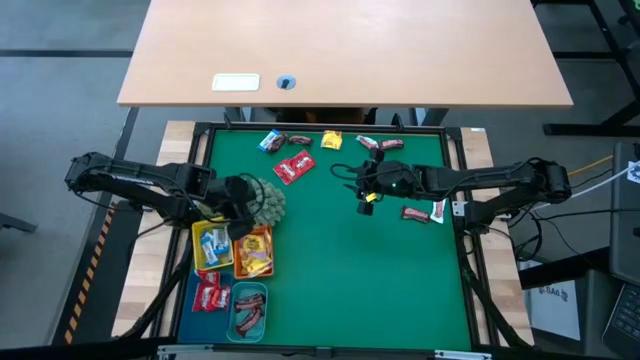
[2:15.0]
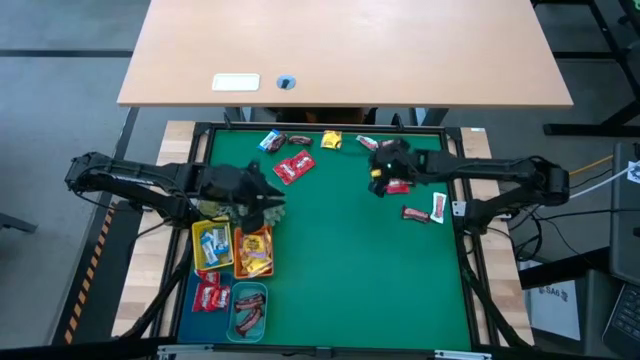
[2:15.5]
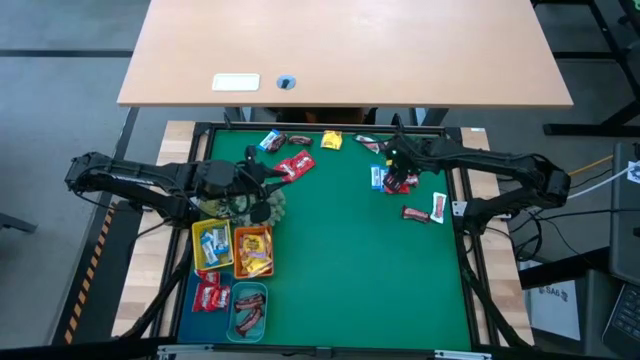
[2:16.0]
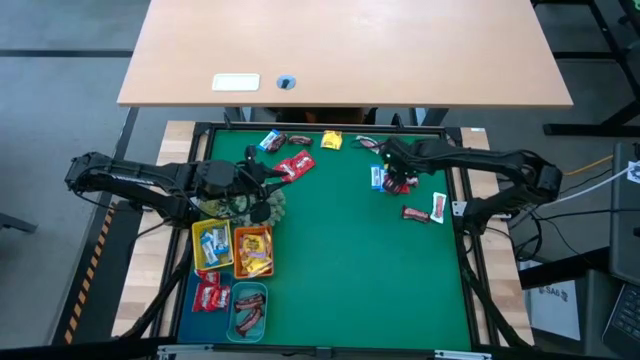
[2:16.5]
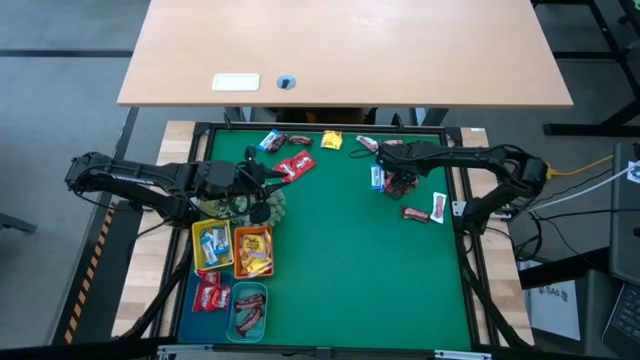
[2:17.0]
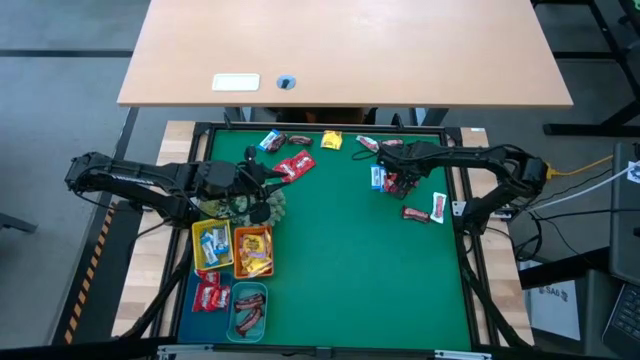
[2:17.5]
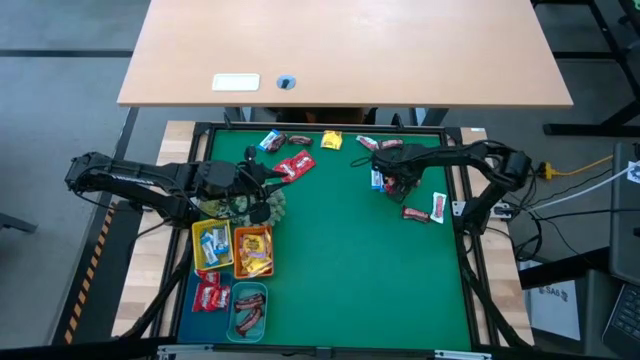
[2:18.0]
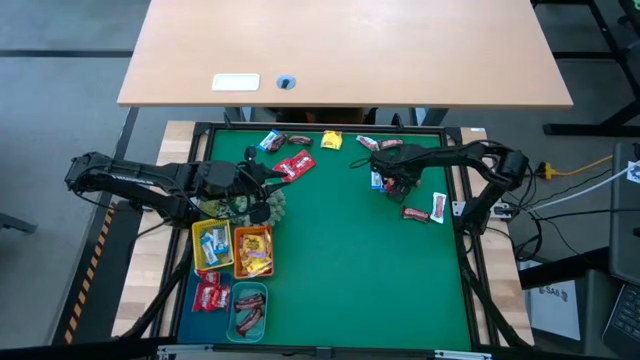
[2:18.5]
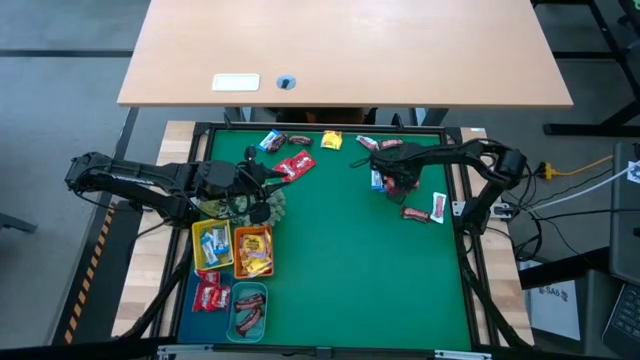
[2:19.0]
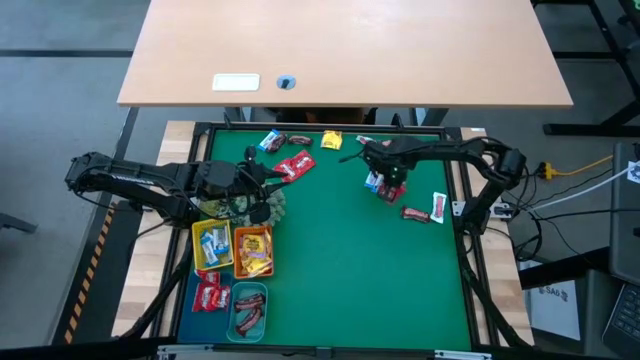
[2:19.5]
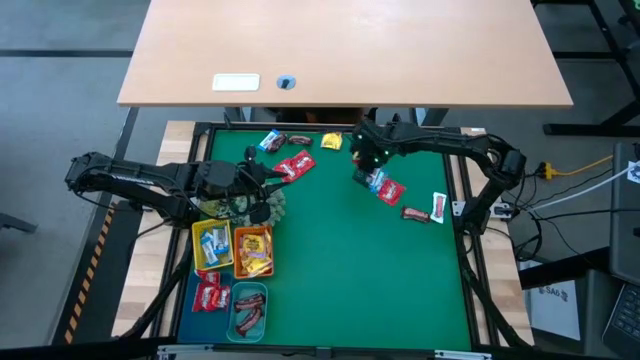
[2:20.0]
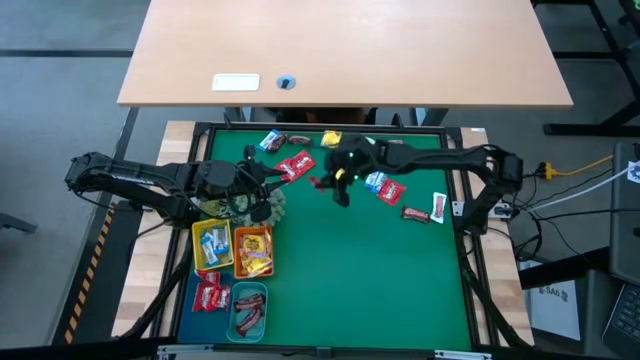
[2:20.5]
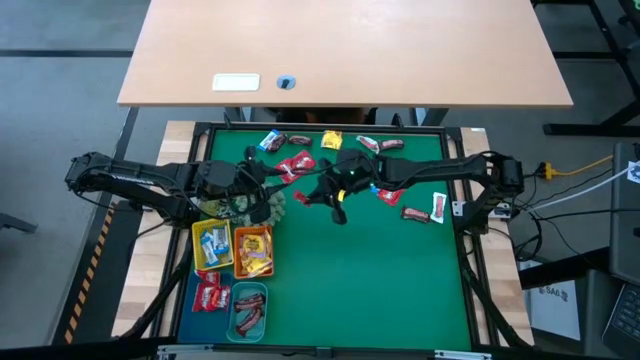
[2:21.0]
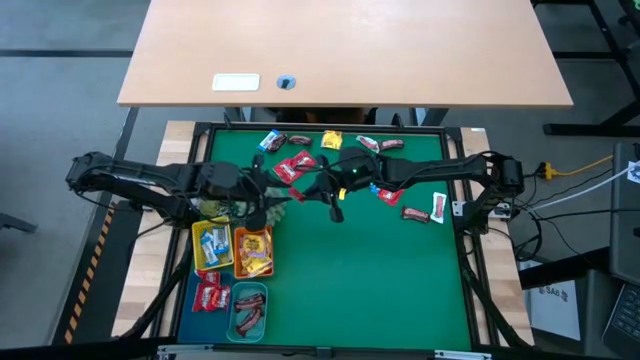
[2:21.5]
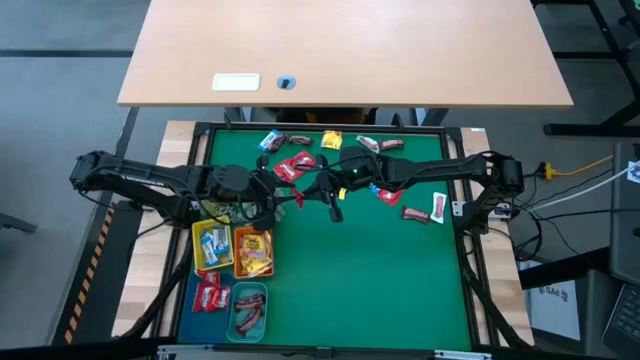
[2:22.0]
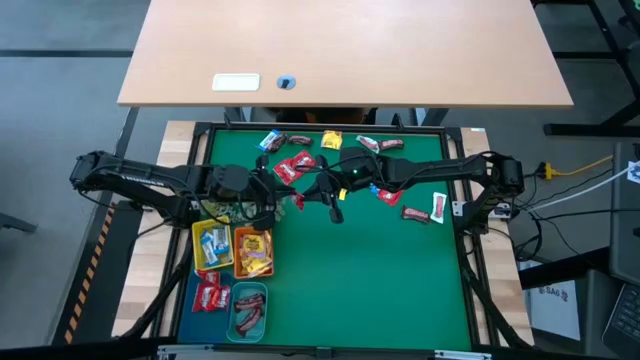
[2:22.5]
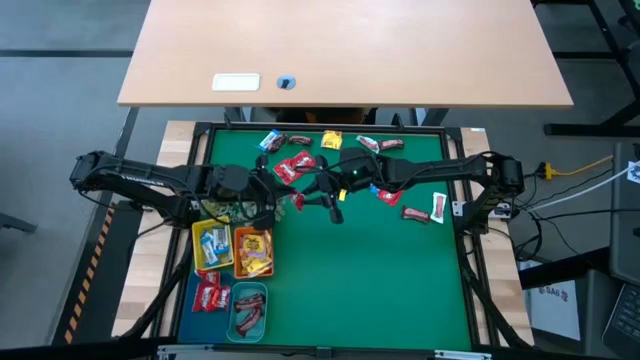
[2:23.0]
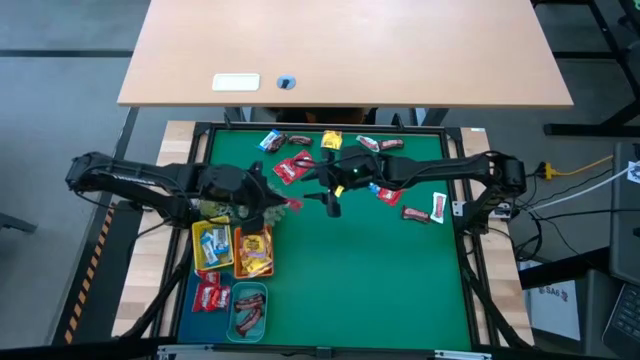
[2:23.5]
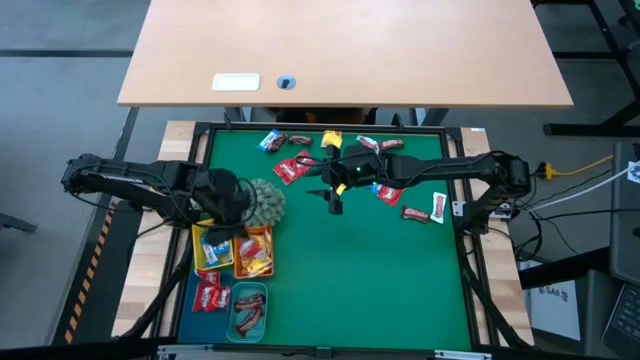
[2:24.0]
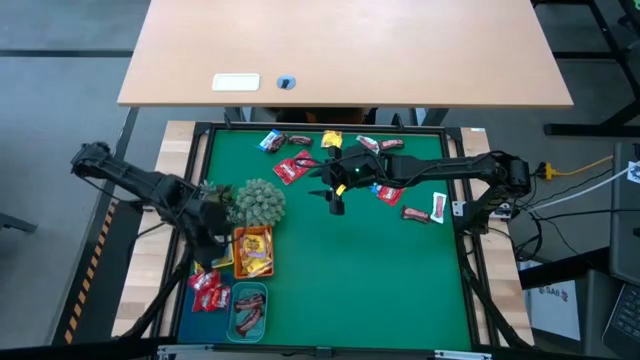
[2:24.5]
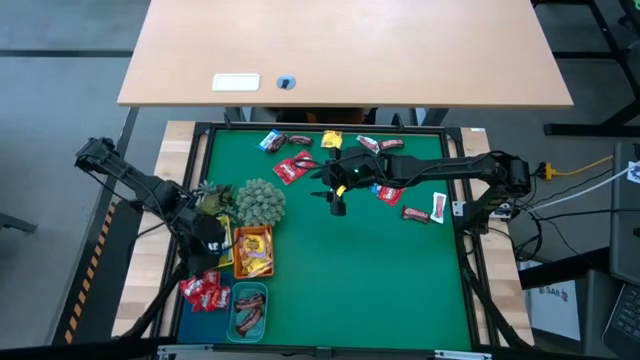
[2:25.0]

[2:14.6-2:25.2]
Task: Sort candy
Put the red candy into the blue basket

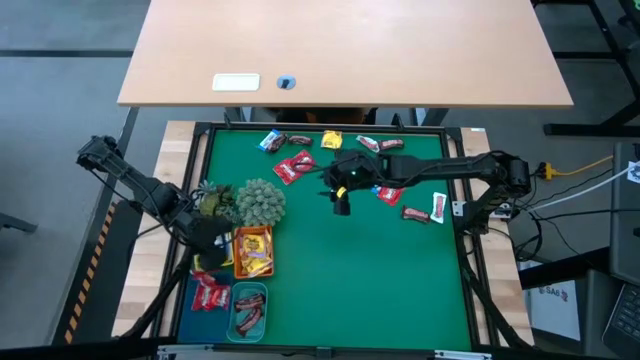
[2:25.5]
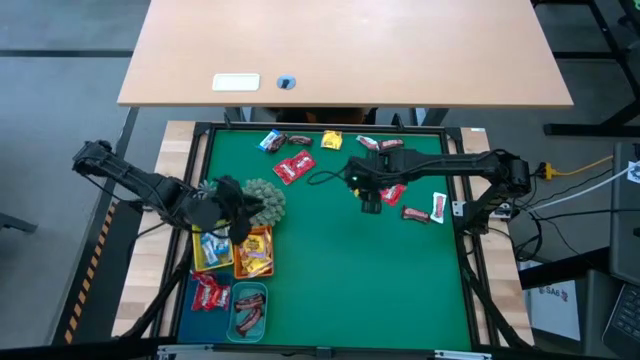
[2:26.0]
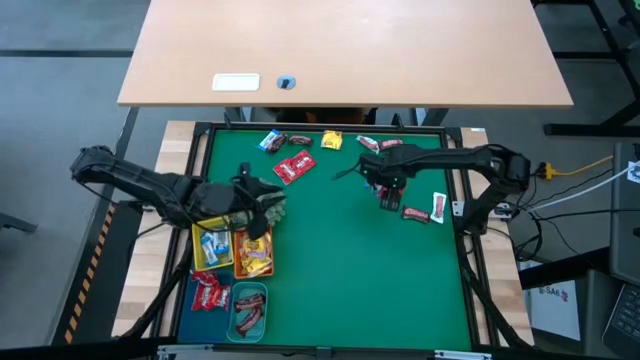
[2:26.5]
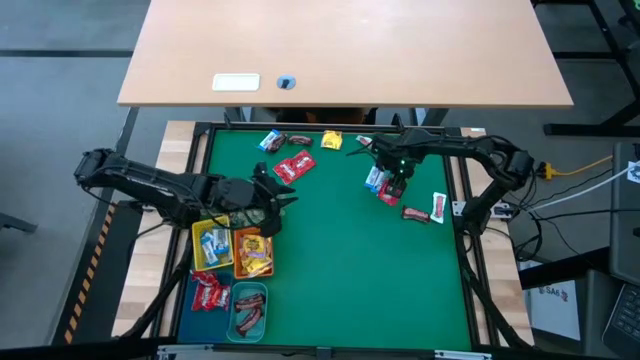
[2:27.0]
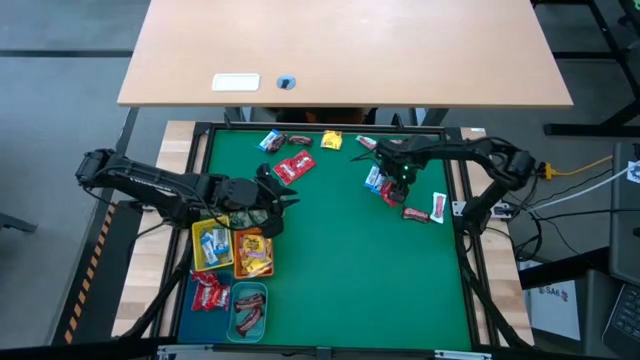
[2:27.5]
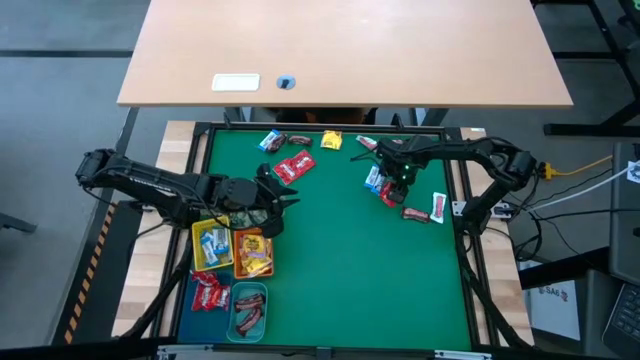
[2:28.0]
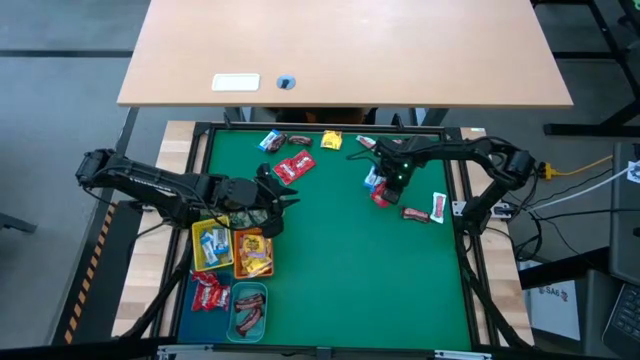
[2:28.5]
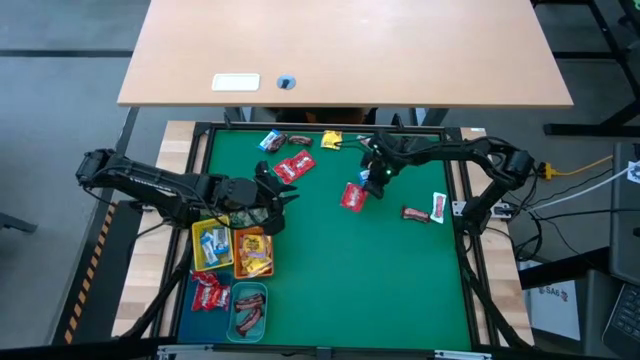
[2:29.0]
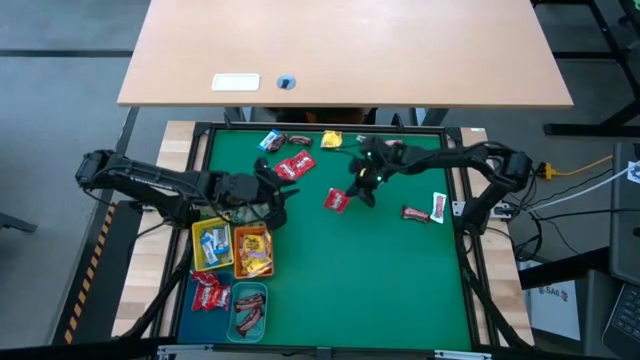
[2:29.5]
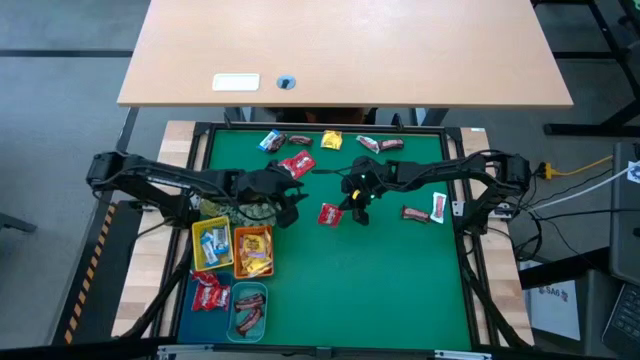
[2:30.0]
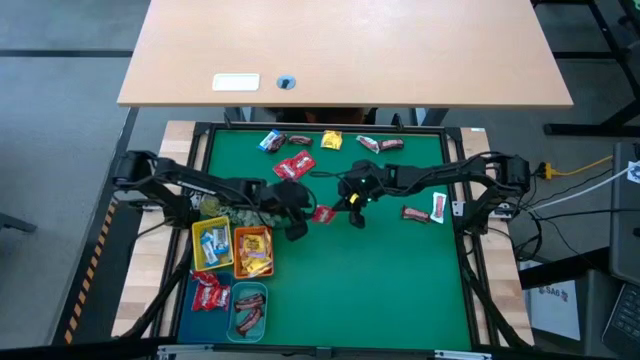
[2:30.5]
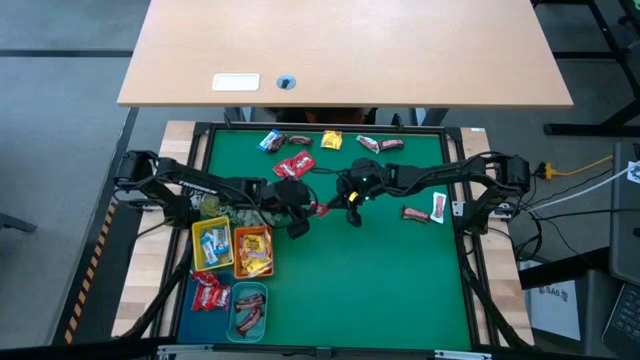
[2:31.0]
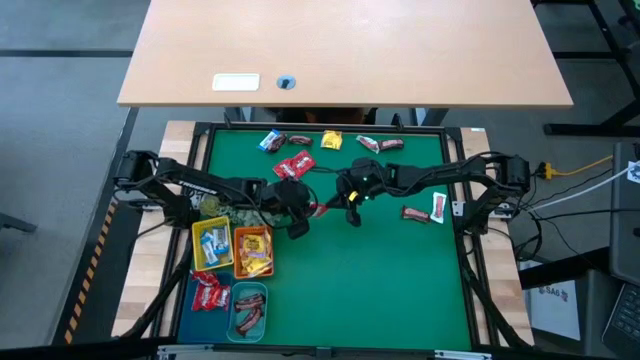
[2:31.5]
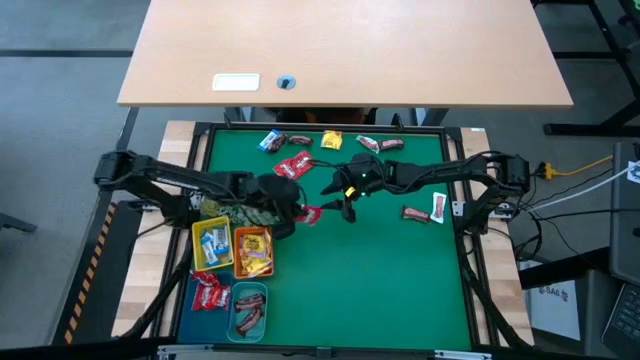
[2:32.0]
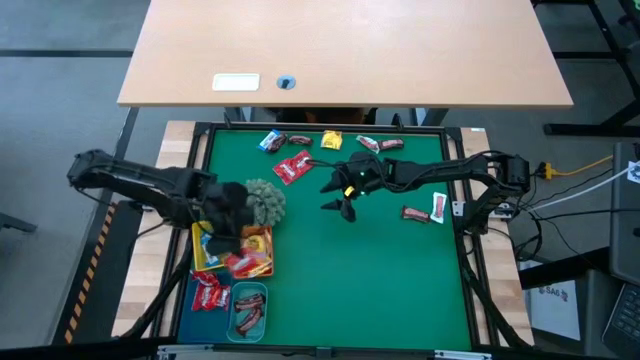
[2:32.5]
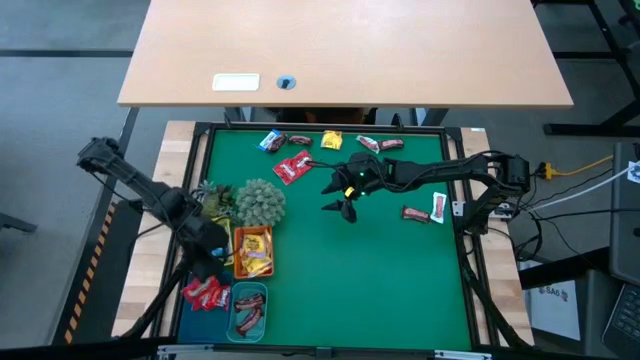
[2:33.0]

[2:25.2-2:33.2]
Put the red candy into the blue basket

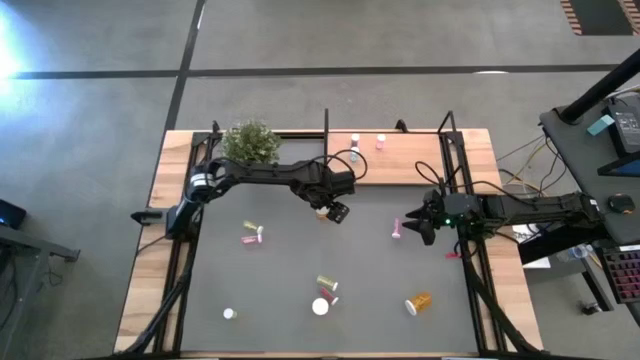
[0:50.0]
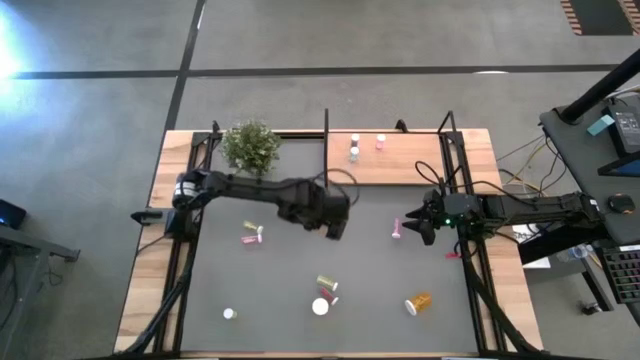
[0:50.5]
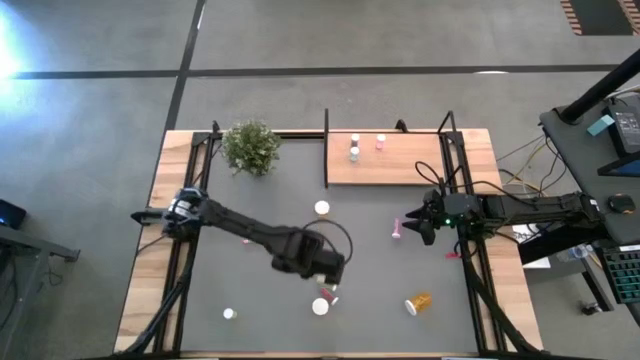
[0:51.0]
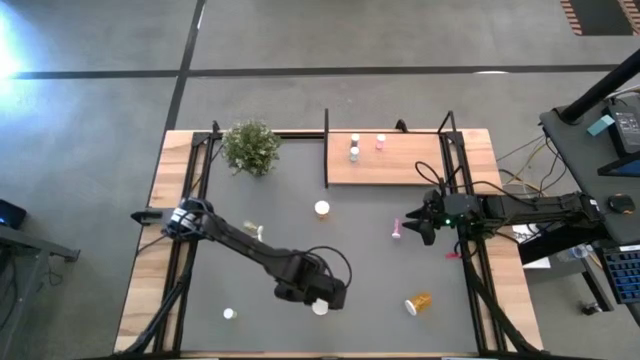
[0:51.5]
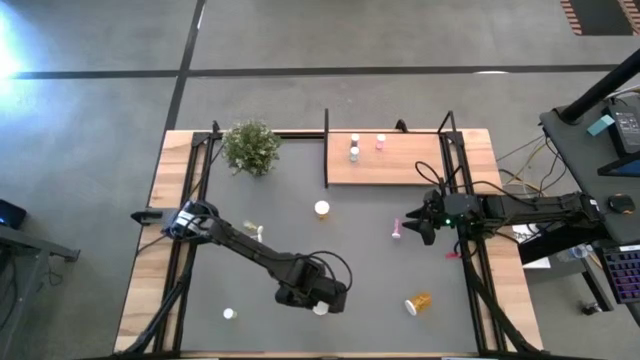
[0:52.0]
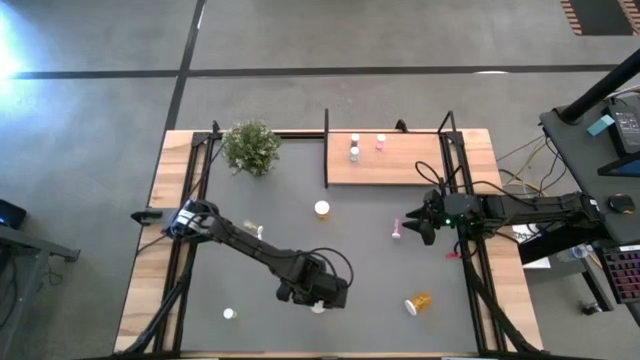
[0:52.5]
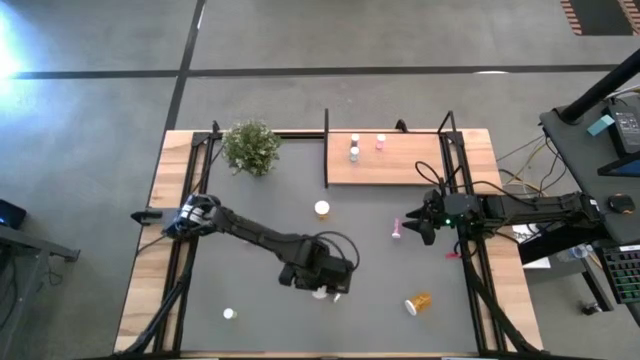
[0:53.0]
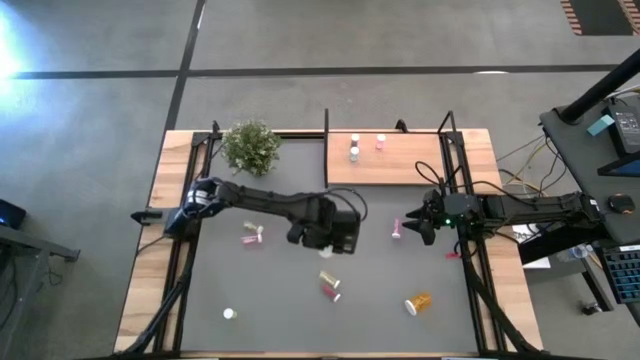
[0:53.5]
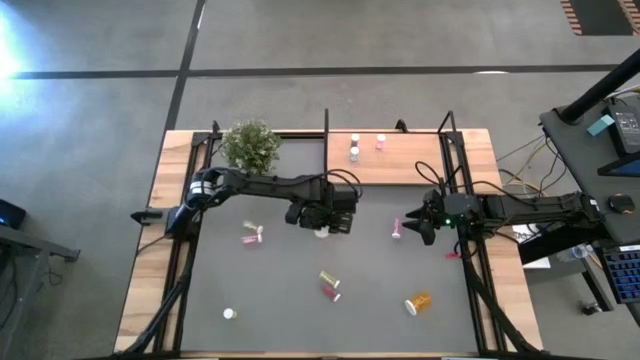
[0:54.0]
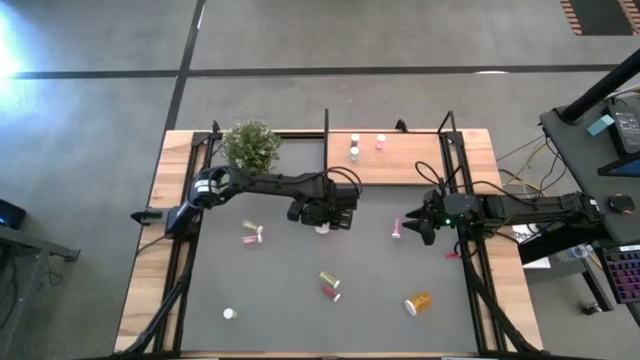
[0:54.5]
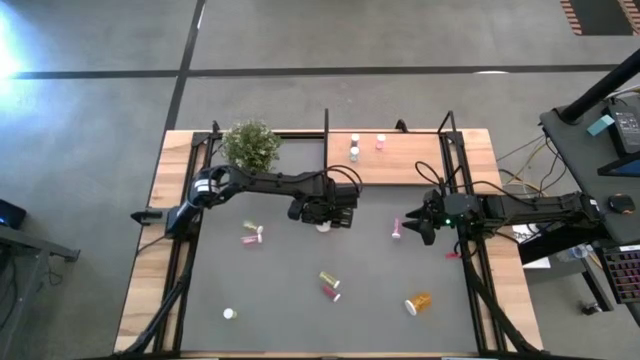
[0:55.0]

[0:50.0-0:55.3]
Task: Pick and place medicine bottles onto shelf by color
Move the bottom left orange pill bottle to the middle of the table aligned with the other orange pill bottle
